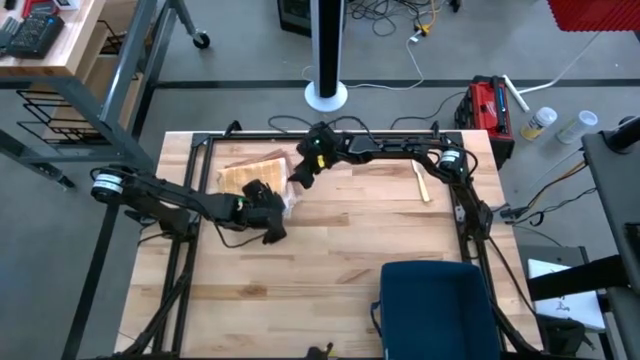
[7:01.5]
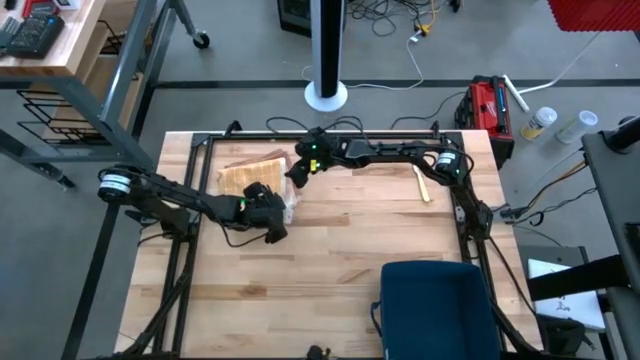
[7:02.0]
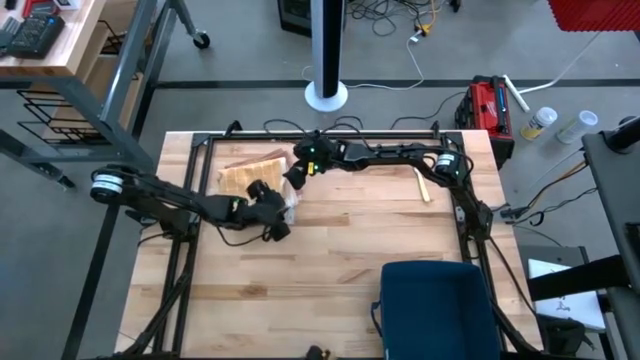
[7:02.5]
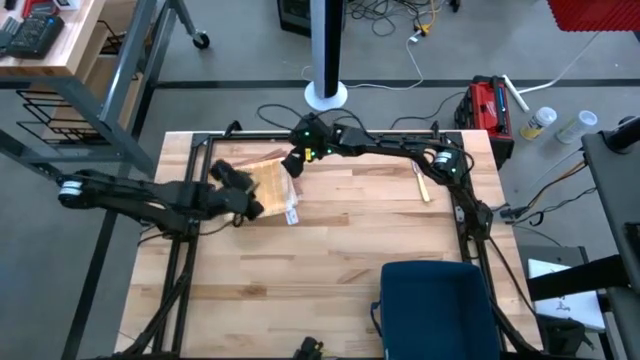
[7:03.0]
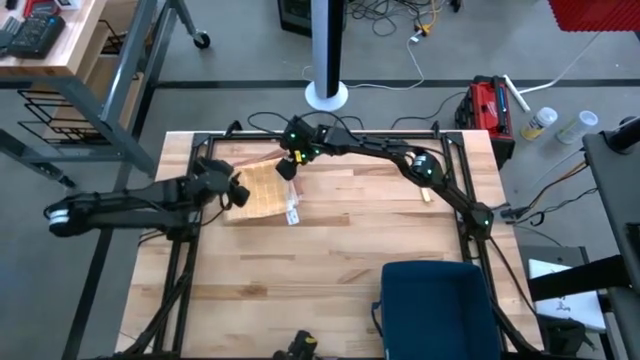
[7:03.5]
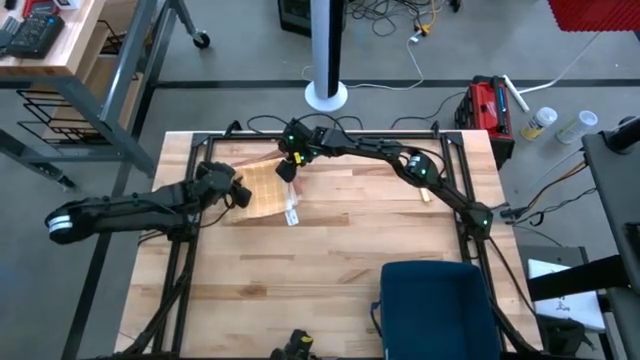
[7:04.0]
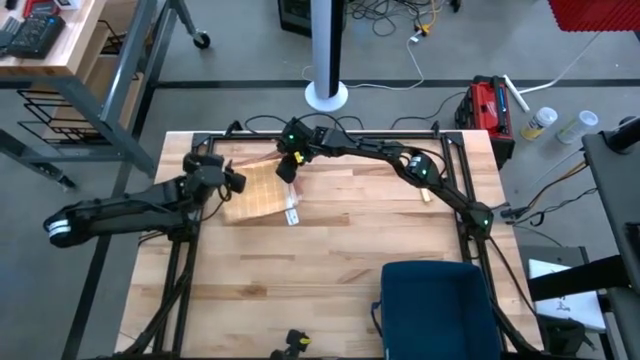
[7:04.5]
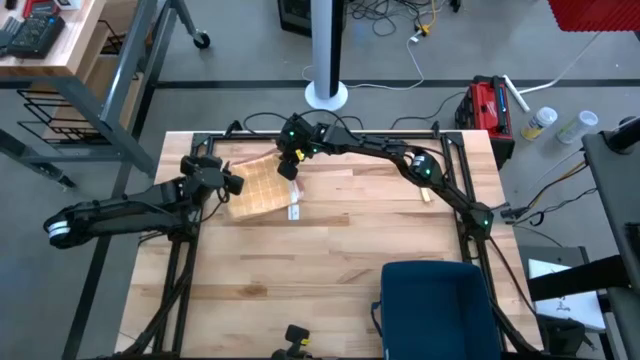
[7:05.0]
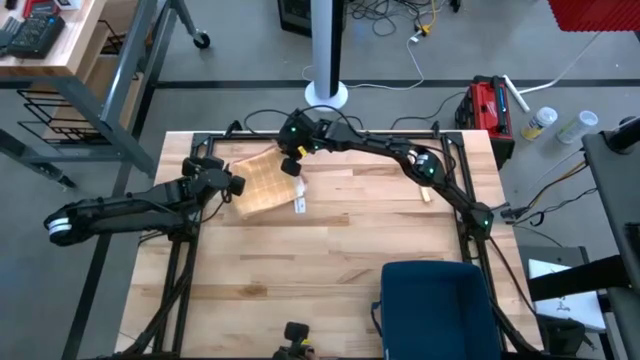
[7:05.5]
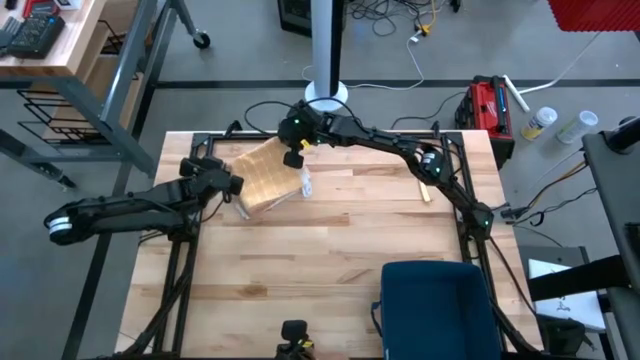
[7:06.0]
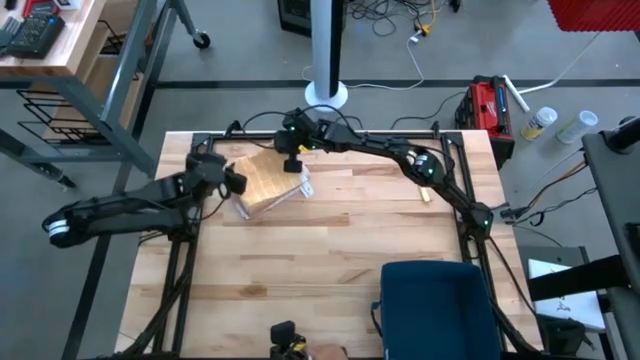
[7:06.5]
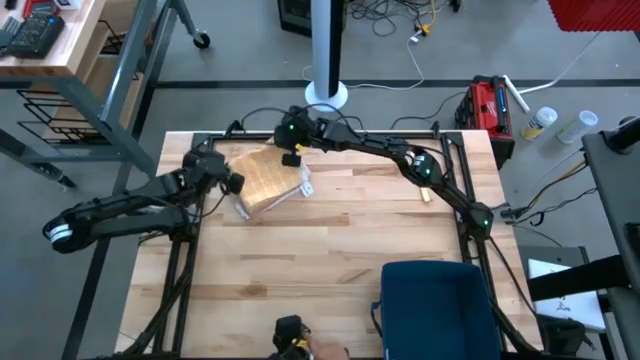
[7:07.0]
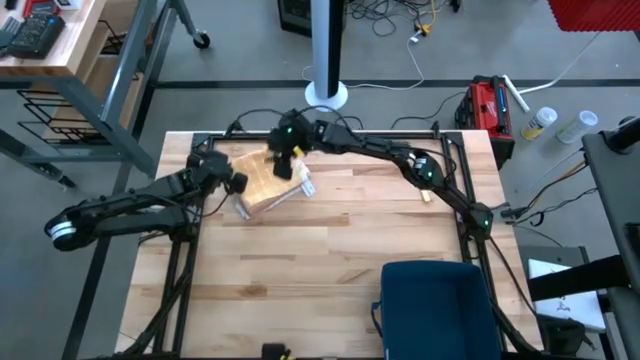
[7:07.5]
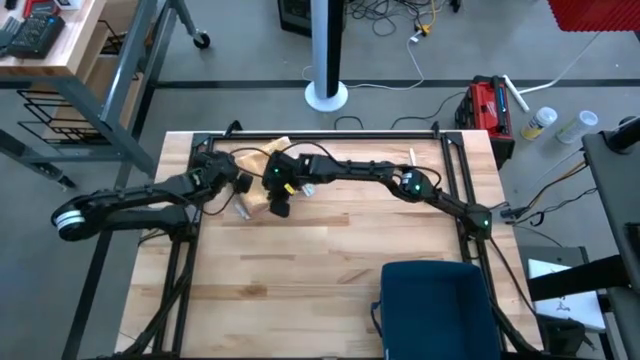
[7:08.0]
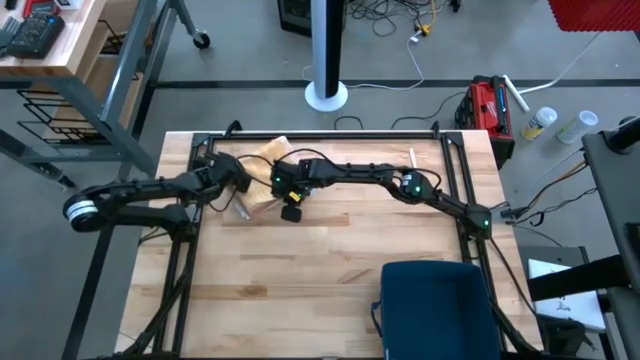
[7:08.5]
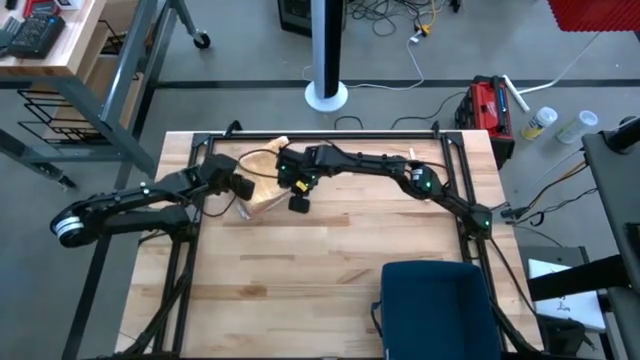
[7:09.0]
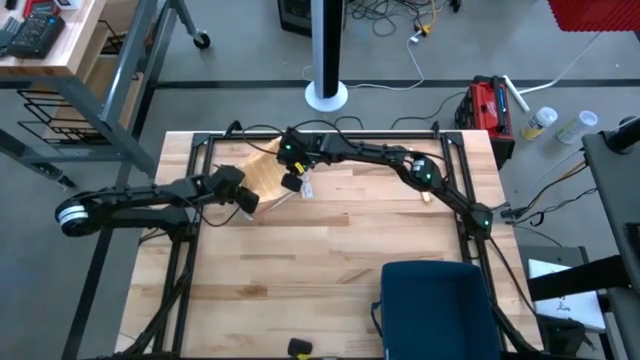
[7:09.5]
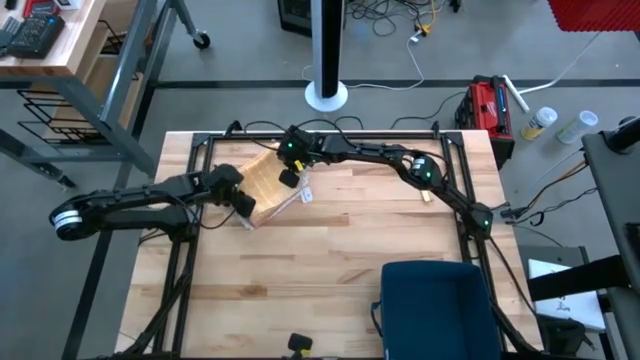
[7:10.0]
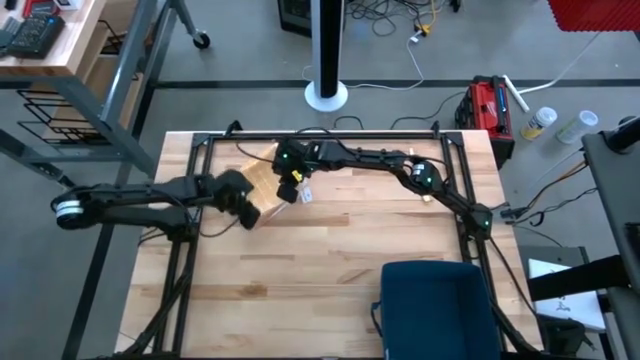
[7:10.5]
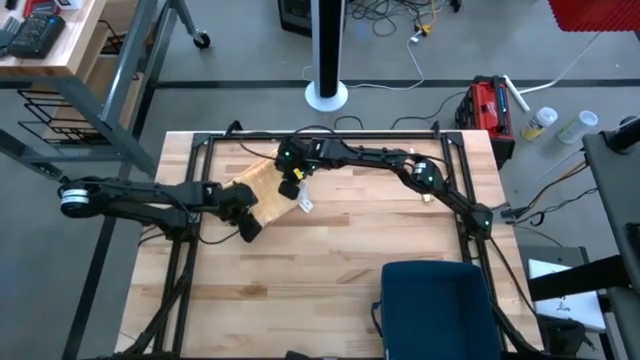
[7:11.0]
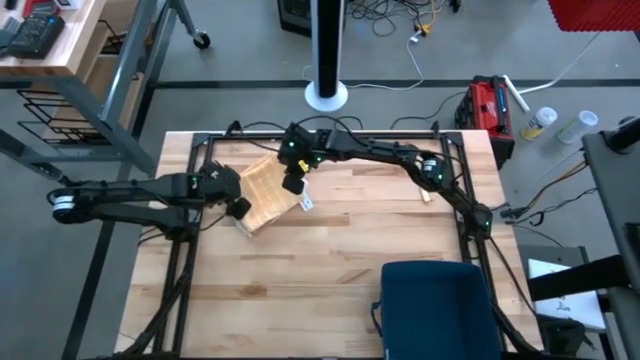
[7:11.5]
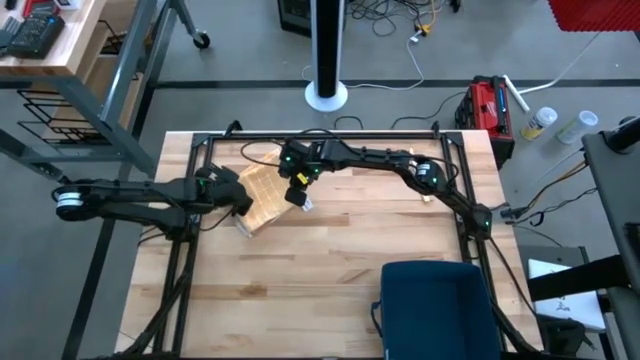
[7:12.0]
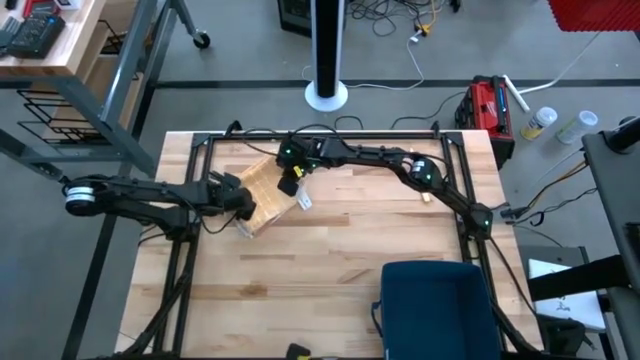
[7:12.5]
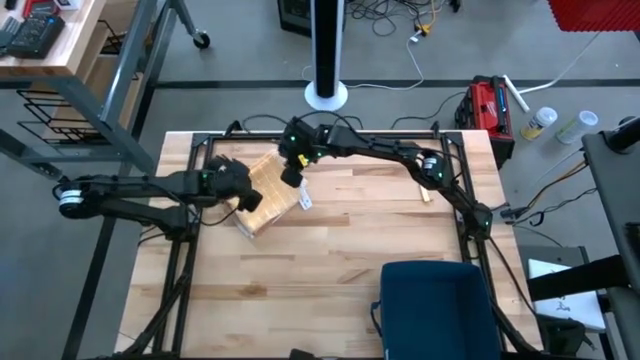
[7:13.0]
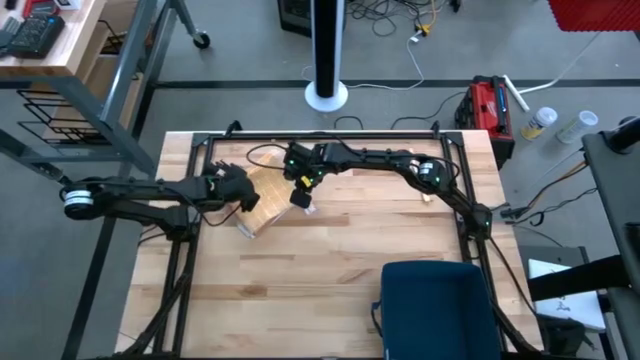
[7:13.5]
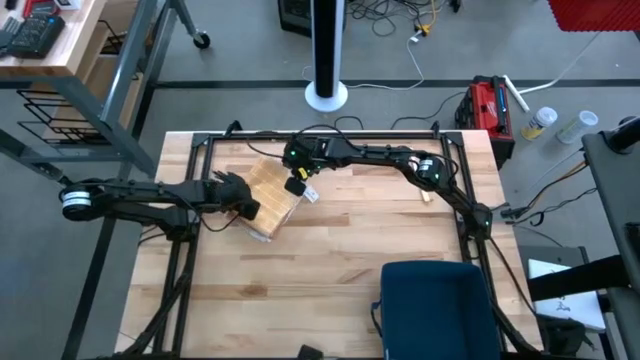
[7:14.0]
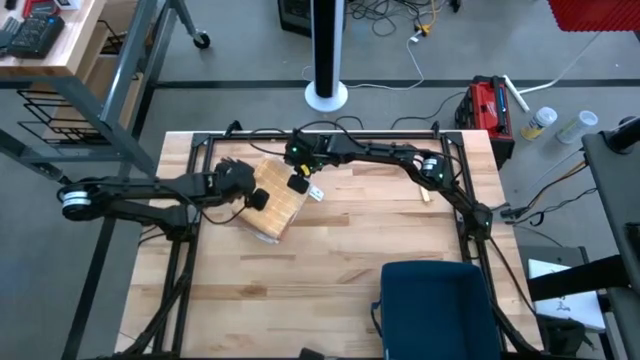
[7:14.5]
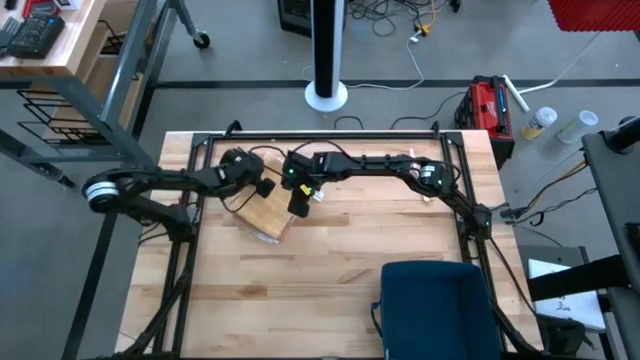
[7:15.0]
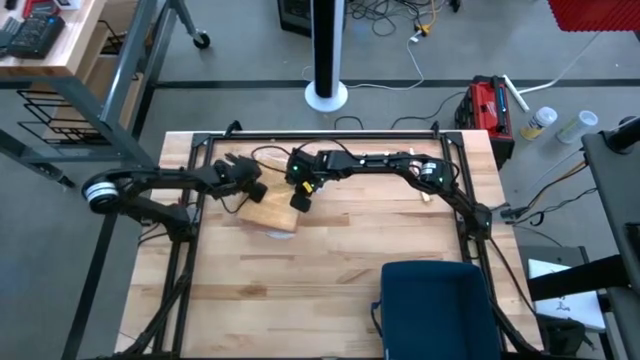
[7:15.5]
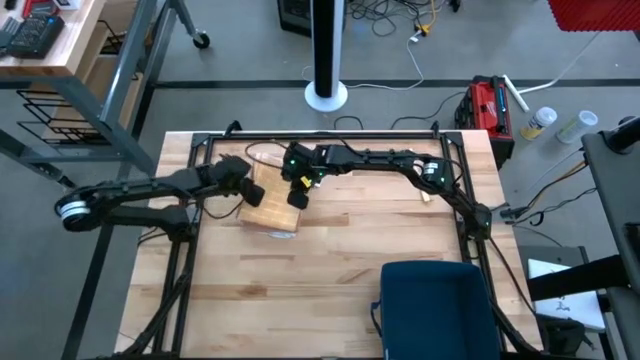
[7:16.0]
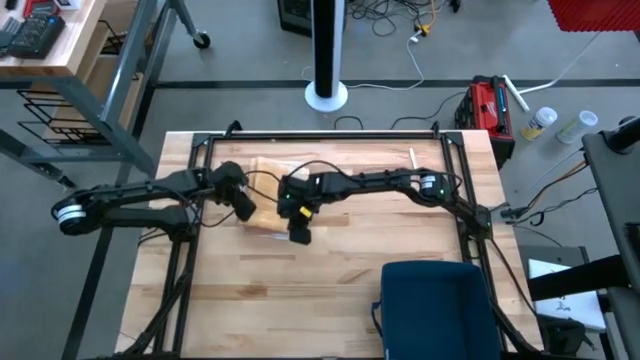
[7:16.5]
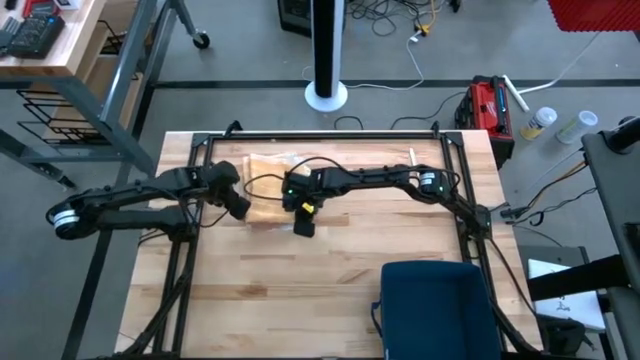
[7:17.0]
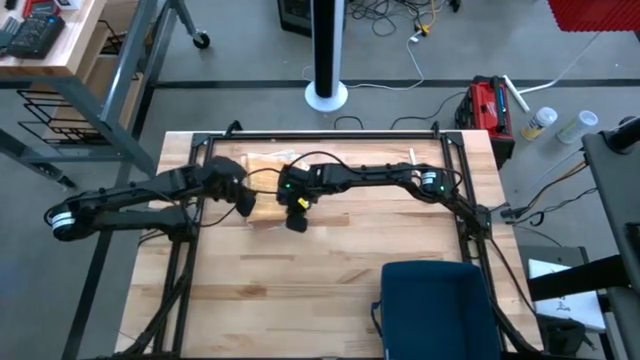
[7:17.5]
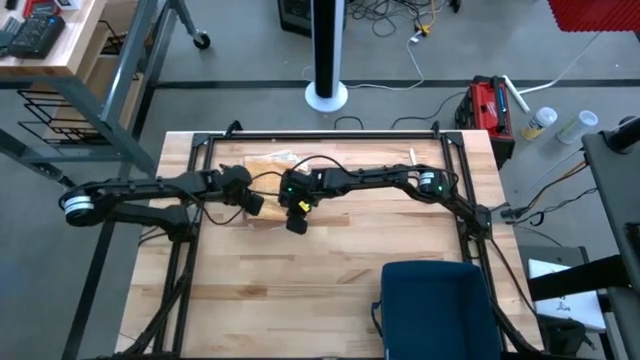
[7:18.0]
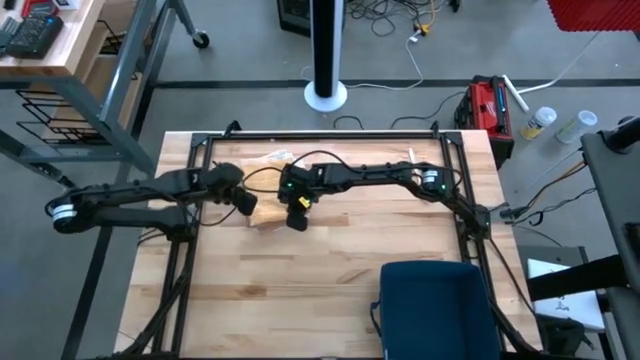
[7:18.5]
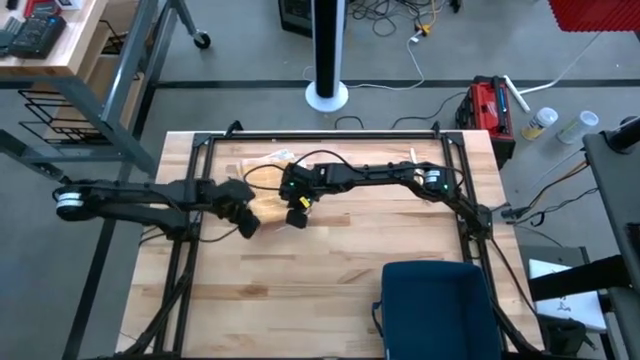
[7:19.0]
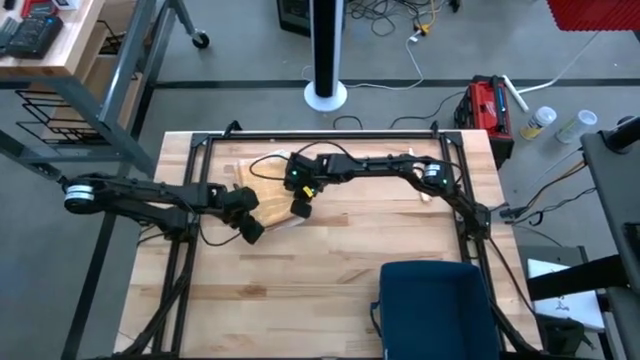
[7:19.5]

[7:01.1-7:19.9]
Task: Fold towel
Stack the yellow towel on top of the brown towel

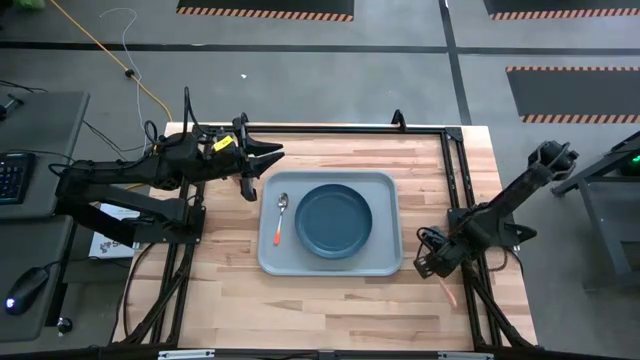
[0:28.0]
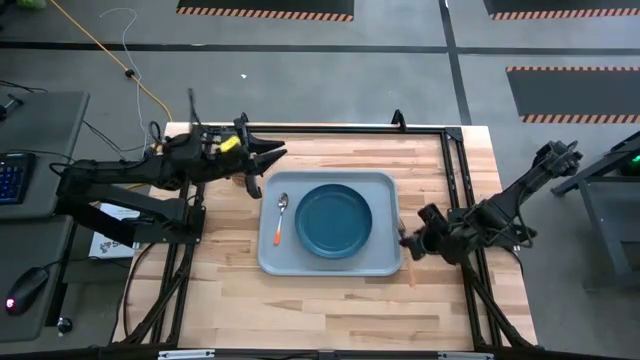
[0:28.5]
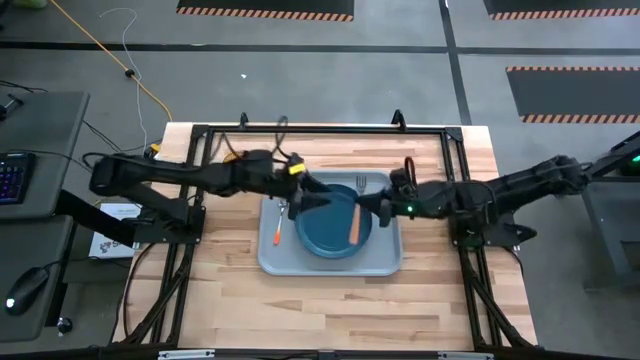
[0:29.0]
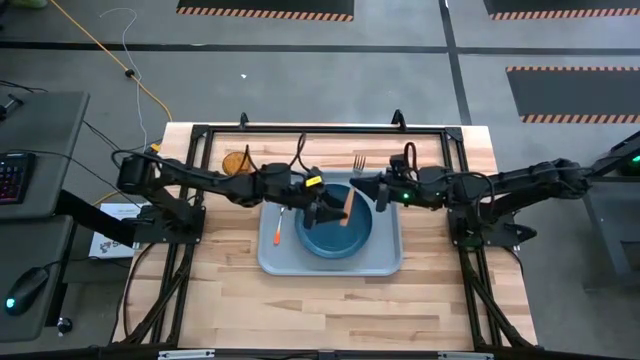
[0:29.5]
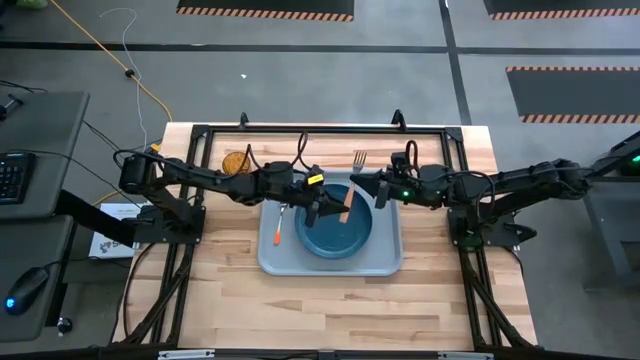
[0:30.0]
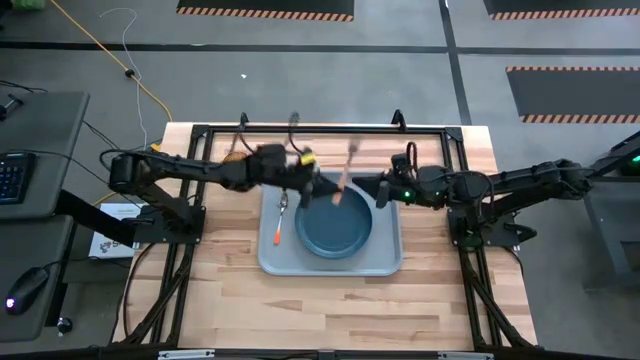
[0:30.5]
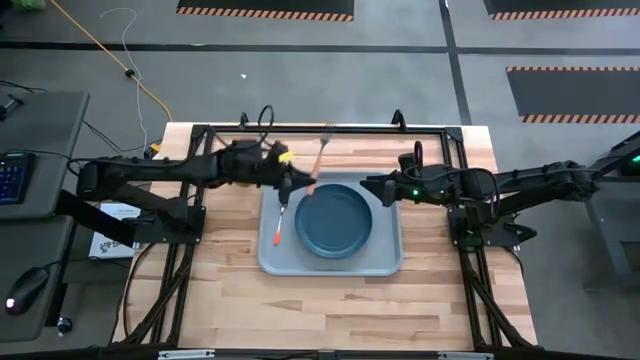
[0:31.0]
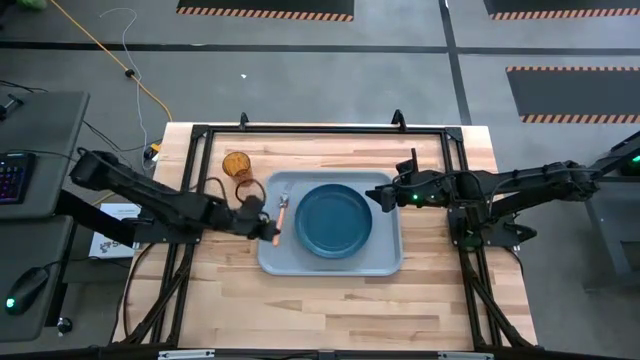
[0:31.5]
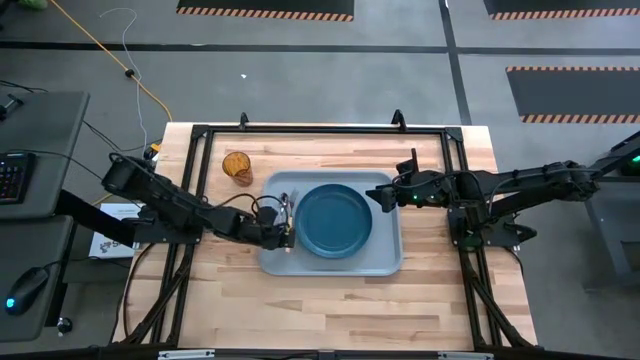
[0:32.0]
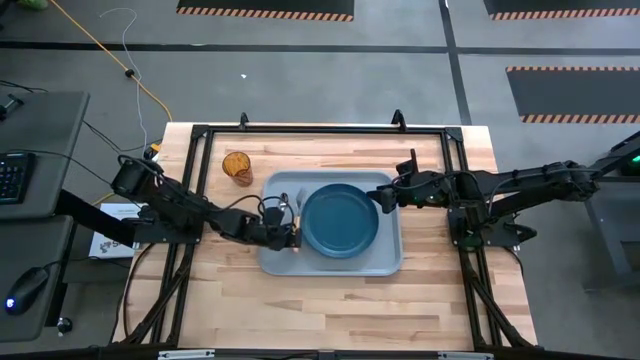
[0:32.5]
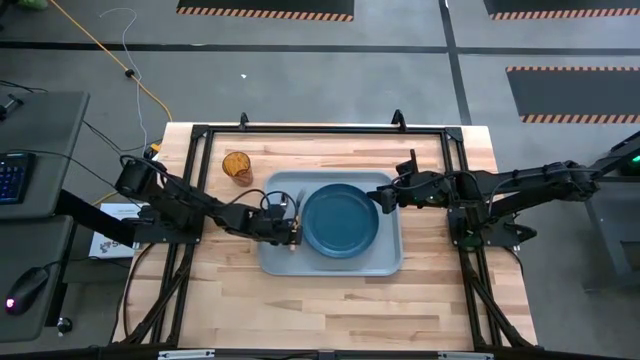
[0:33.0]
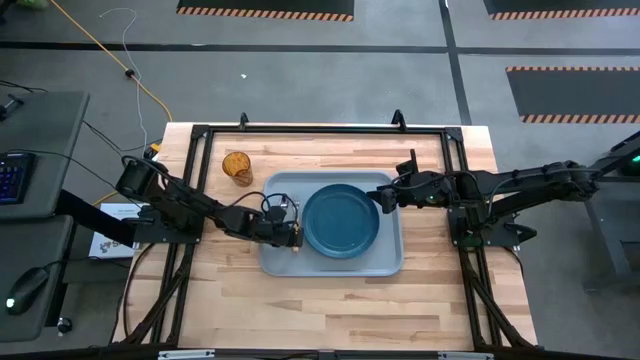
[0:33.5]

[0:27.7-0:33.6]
Task: Pick and place plate/cup/fork/spoon on tray
Put the orange fork on the gray tray
